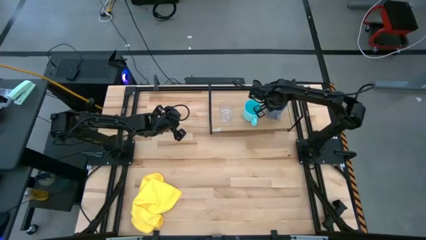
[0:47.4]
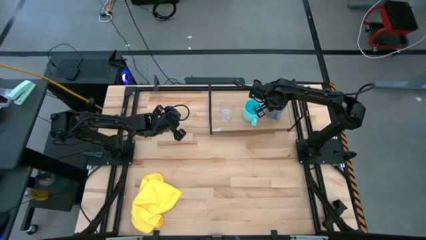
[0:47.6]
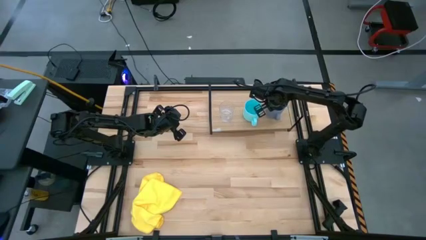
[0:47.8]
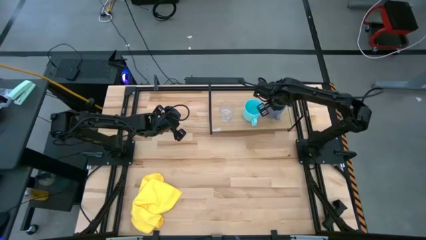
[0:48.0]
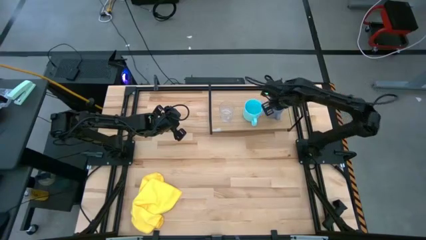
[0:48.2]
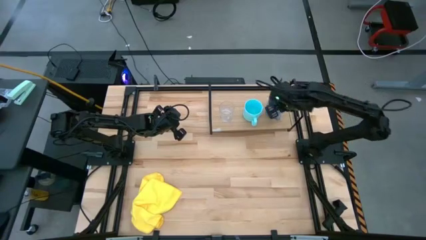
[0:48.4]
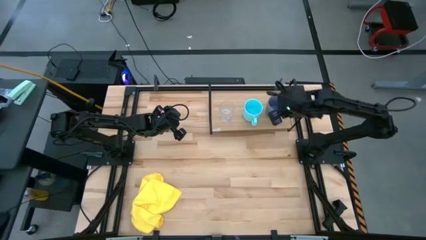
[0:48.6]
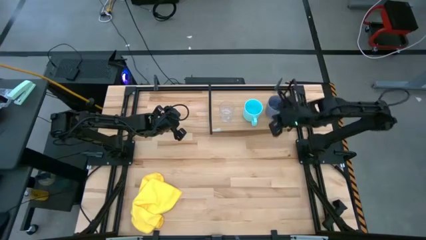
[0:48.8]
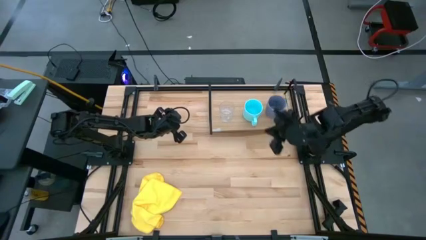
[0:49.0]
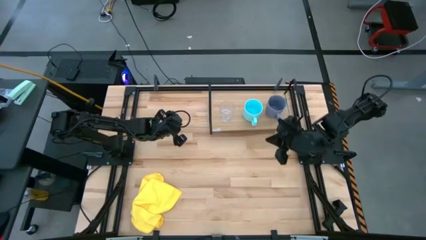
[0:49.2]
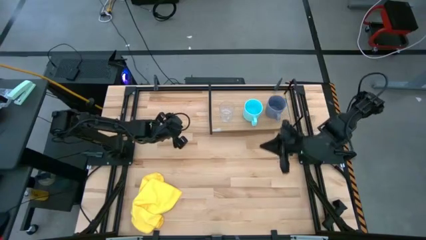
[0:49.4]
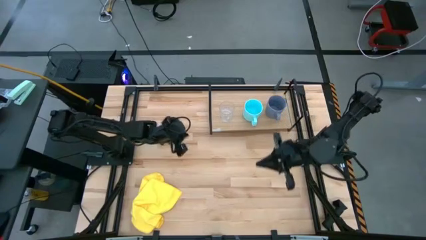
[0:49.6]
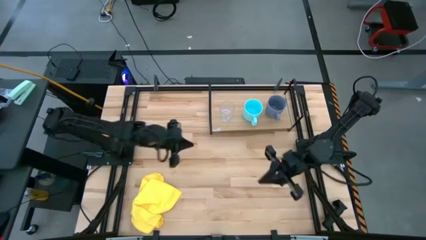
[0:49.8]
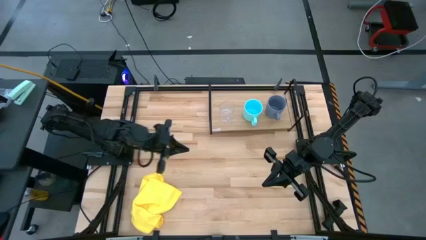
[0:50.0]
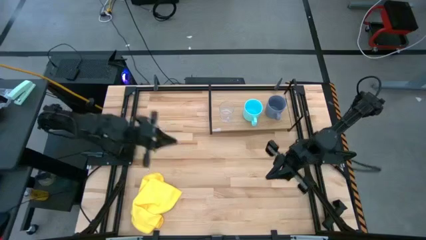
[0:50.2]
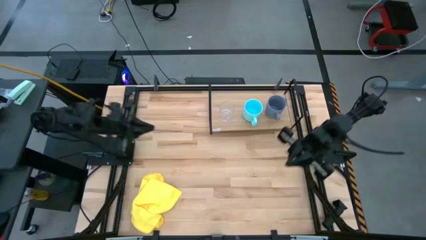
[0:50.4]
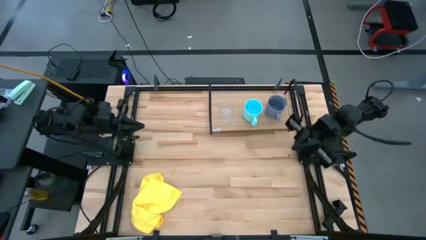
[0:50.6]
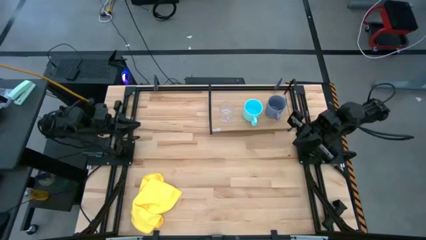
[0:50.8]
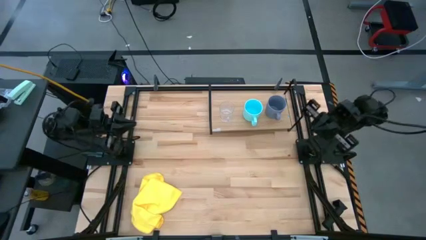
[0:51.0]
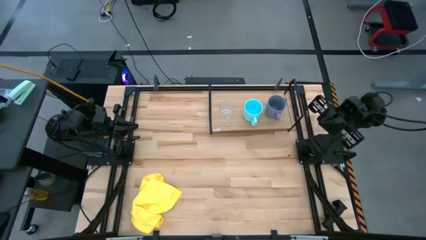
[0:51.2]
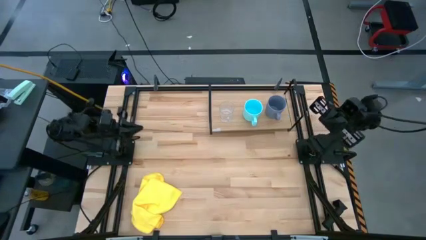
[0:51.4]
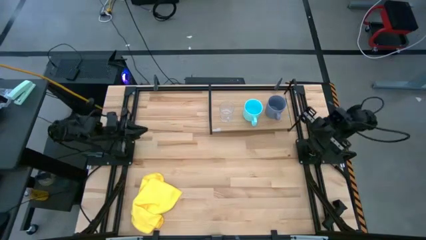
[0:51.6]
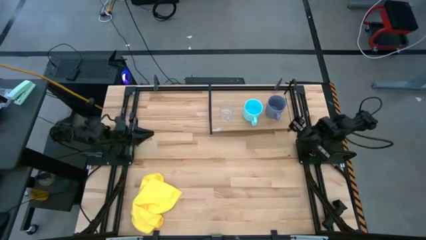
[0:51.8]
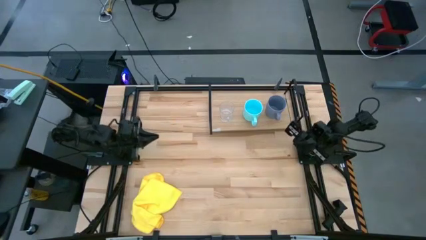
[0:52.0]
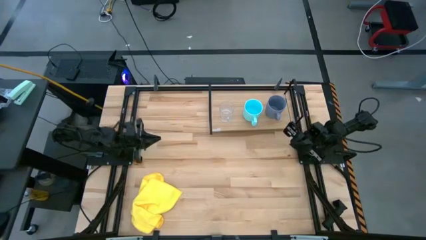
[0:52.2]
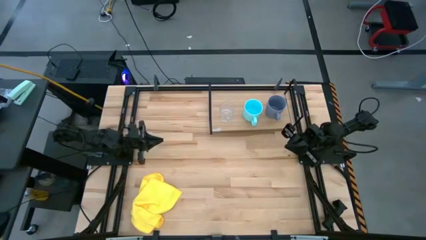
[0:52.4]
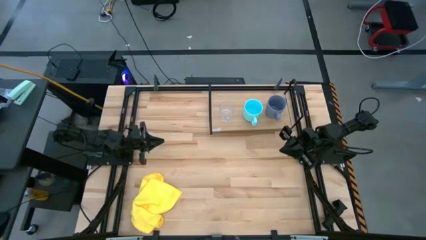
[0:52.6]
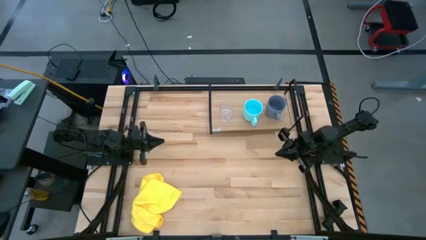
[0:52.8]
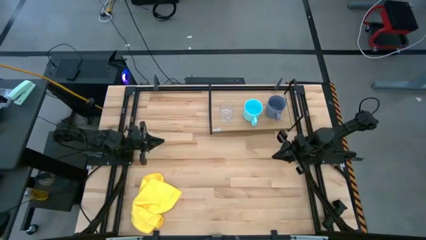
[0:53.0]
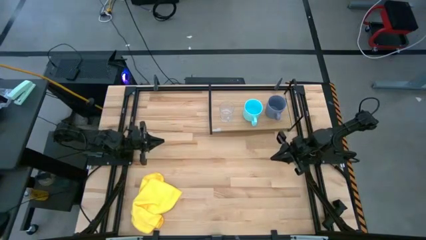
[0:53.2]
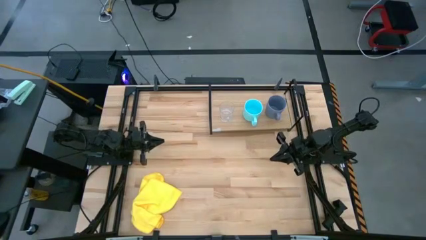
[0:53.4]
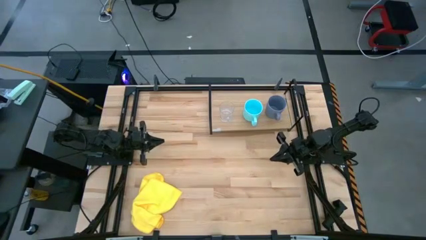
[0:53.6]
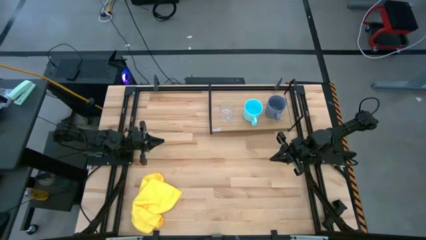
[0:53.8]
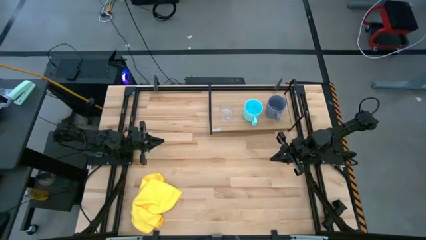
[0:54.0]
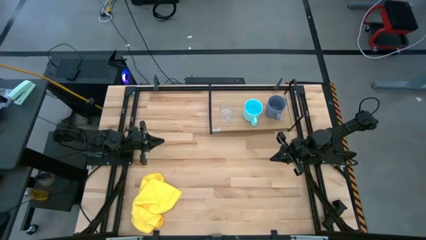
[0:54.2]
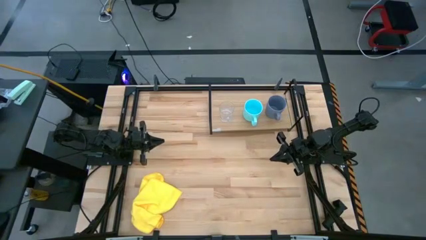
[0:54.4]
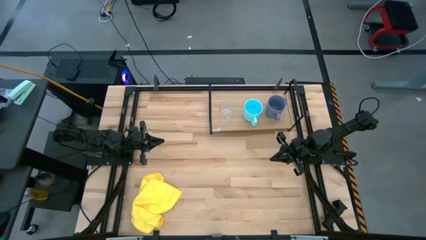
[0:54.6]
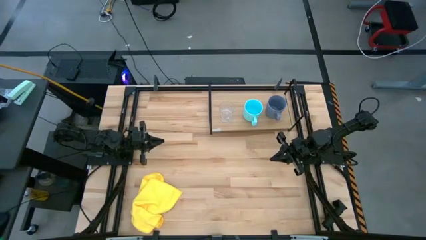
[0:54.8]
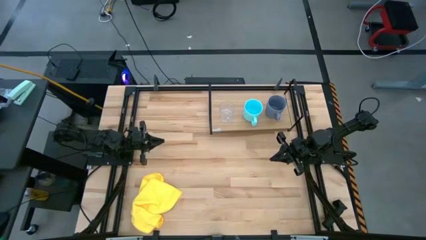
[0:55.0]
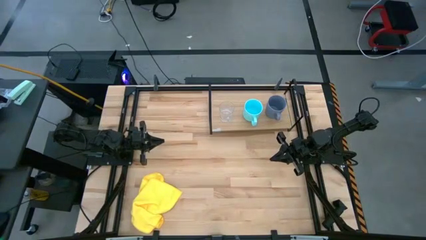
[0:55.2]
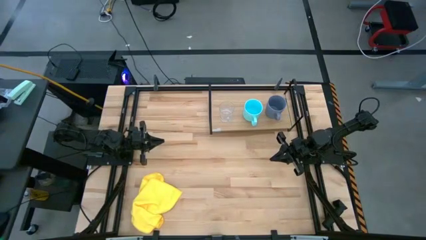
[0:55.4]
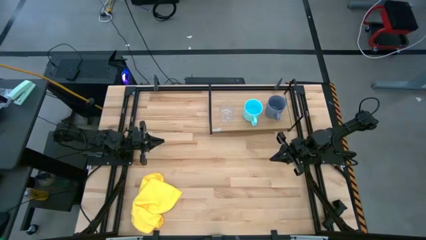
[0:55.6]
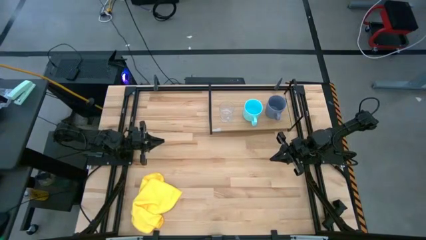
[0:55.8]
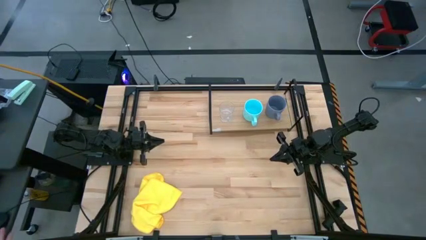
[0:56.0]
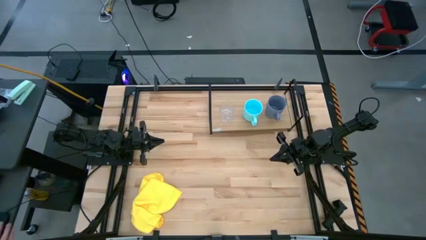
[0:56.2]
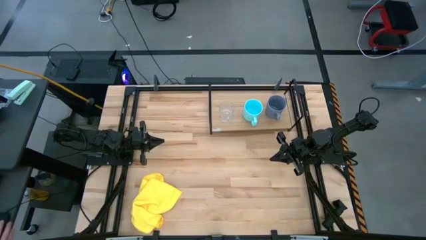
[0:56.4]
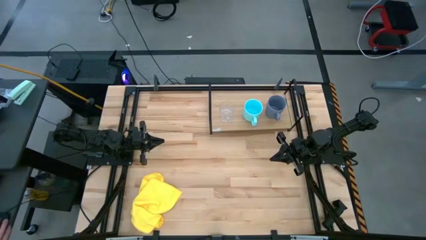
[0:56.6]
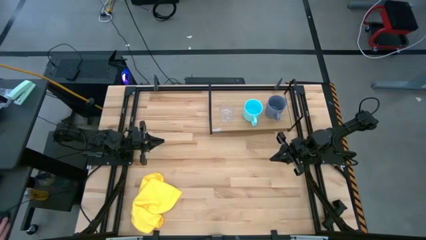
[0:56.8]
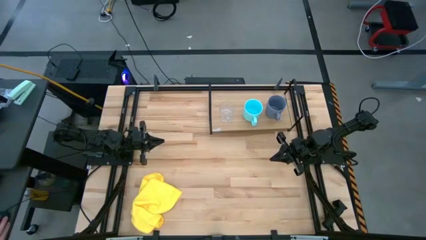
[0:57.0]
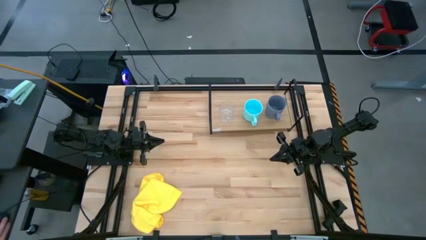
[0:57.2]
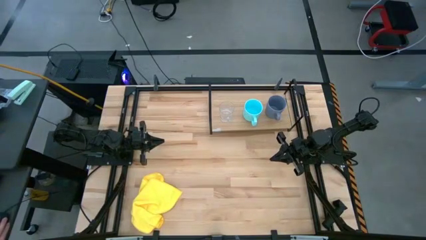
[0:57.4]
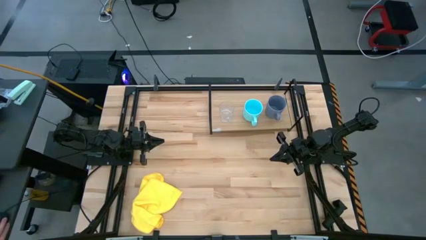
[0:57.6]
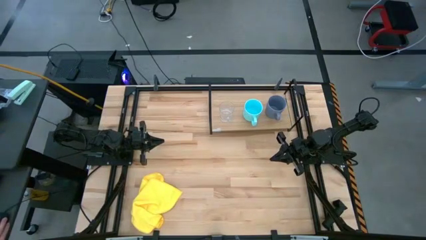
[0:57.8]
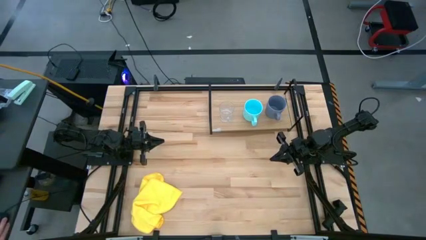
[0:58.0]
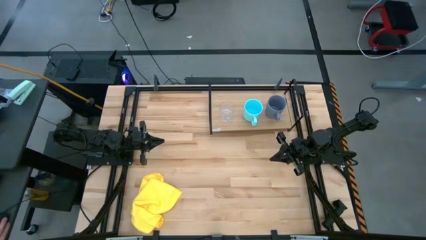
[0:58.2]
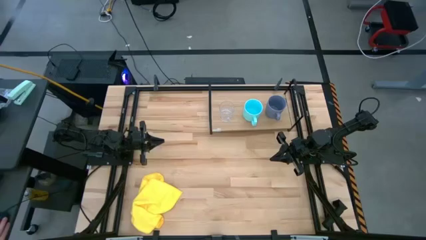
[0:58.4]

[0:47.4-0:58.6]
Task: Stack small to large cups/mugs on shelf
Return to Home Position

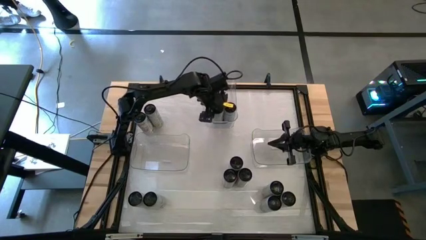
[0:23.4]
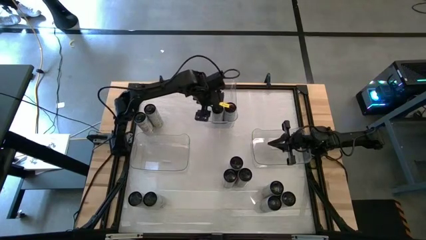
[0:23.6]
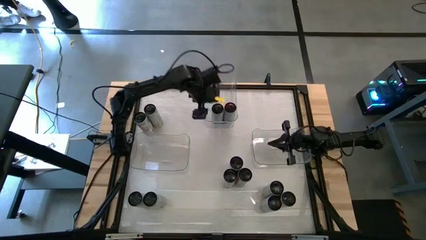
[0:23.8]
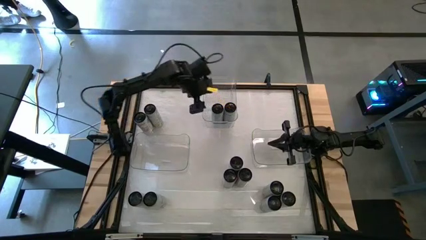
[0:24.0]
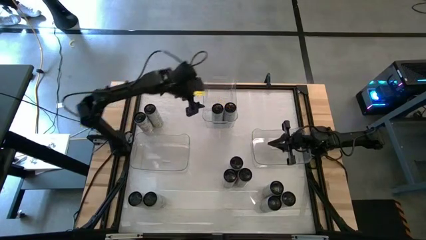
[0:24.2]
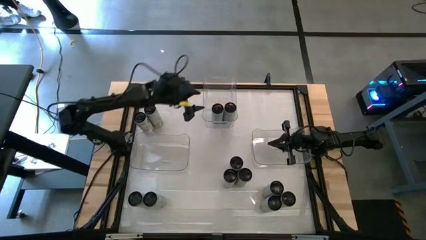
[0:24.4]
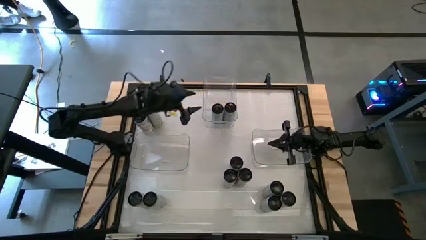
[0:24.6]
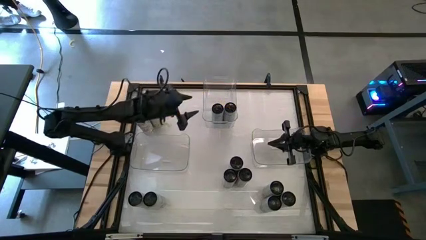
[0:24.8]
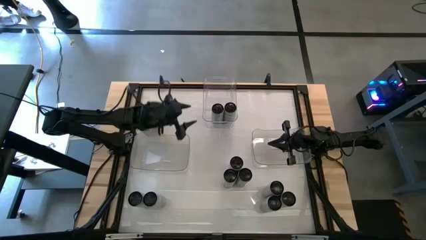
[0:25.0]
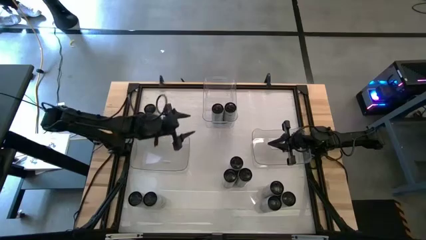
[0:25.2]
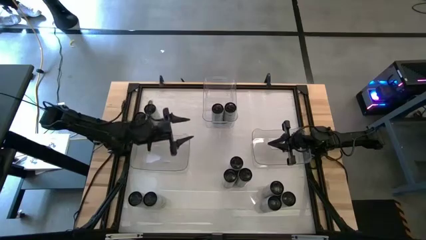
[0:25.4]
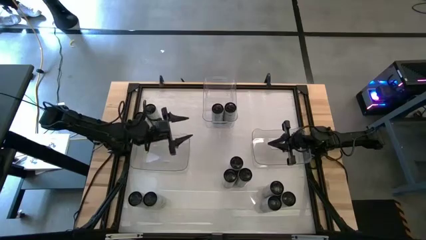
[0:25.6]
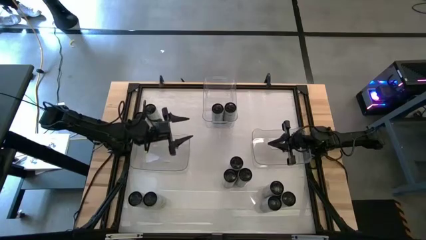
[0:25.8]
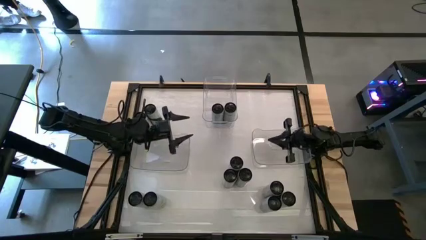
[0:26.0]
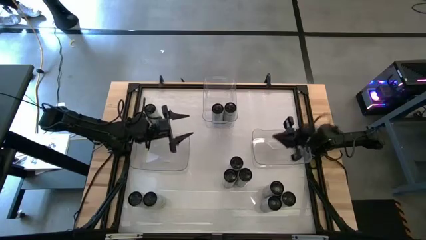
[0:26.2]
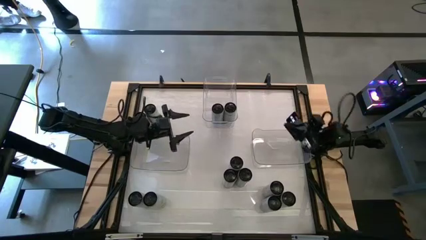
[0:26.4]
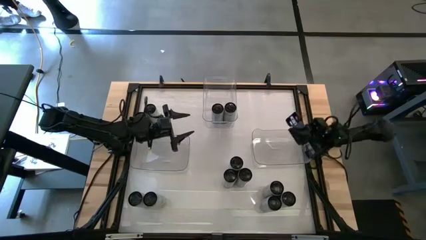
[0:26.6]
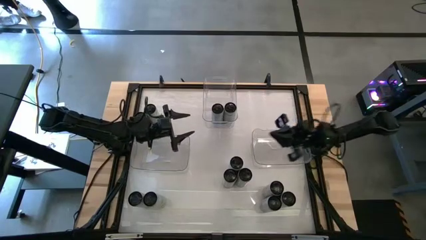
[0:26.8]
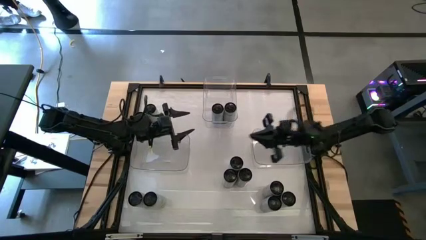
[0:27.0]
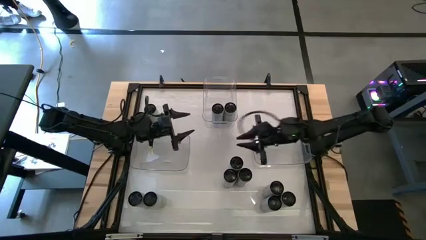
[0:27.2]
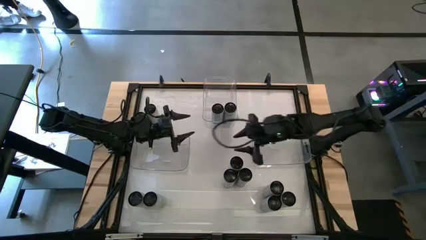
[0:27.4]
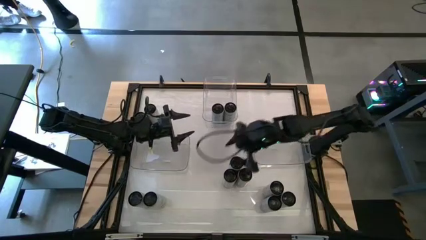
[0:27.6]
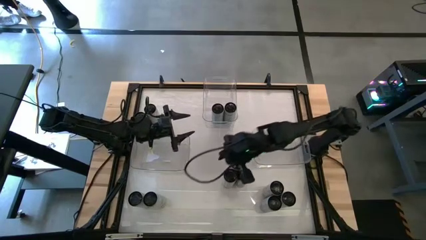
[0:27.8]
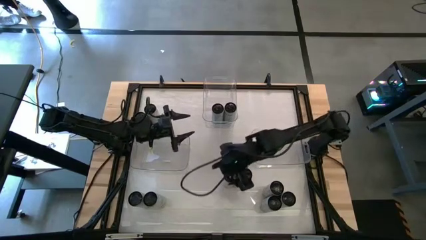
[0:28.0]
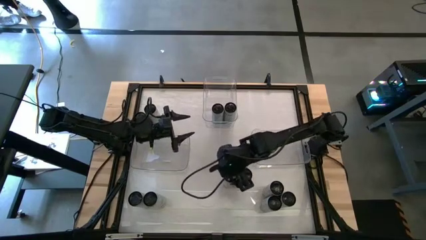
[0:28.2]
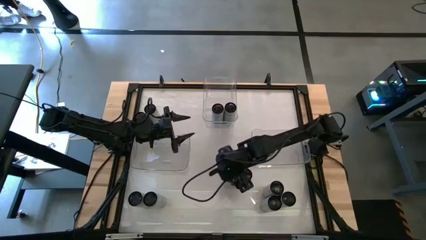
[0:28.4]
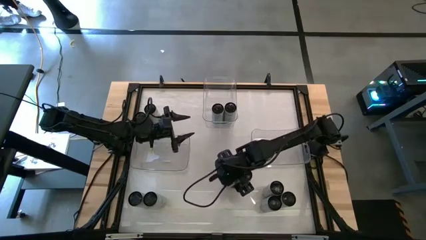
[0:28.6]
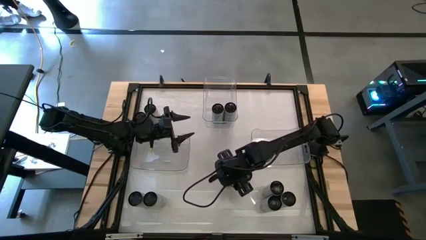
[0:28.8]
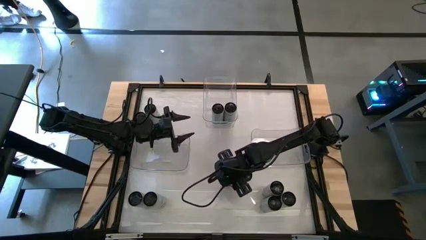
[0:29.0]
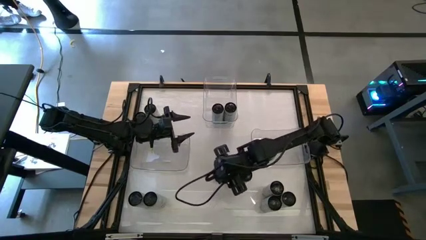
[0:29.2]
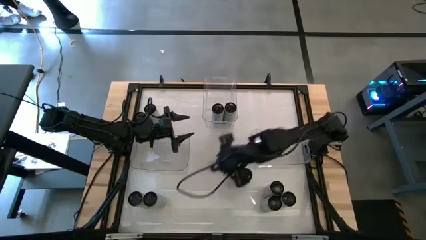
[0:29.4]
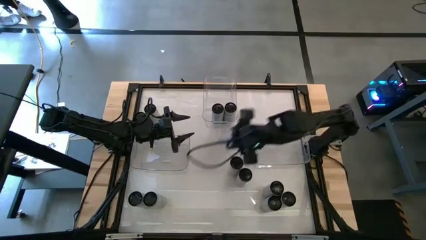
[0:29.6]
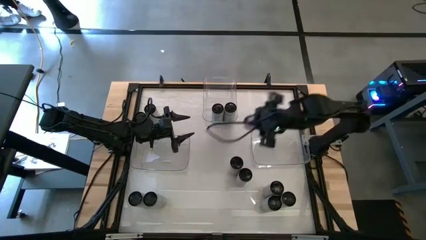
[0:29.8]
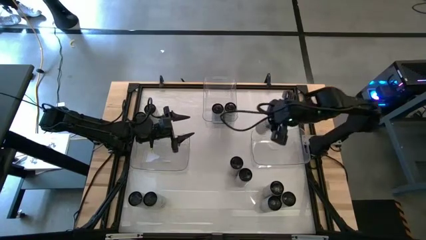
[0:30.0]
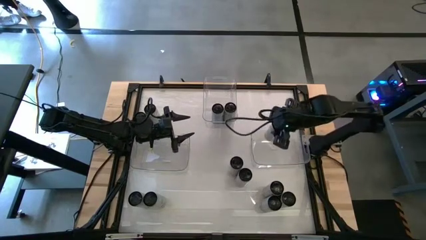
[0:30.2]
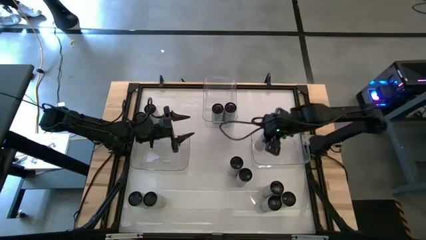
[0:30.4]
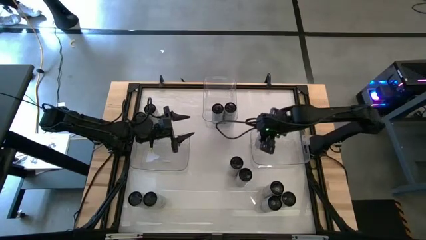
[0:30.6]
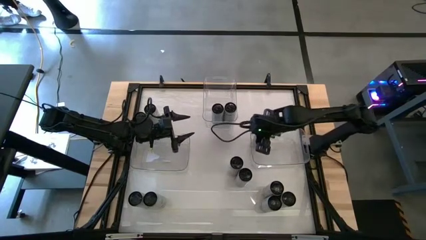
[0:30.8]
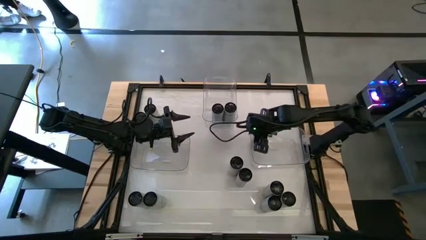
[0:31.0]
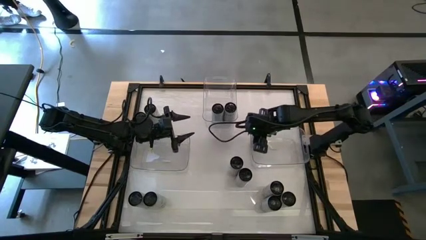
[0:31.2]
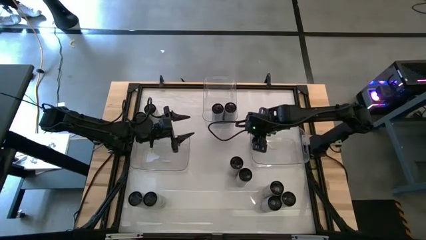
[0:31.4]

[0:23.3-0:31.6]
Task: Sort soda cans
Put the center white-yellow soda can into the bottom right transparent bin
